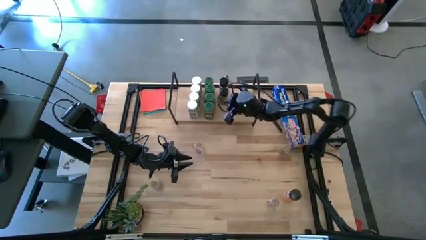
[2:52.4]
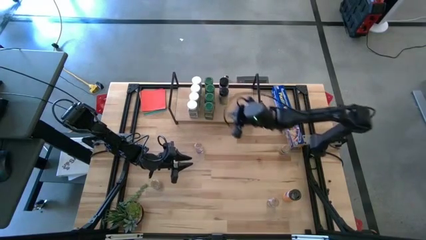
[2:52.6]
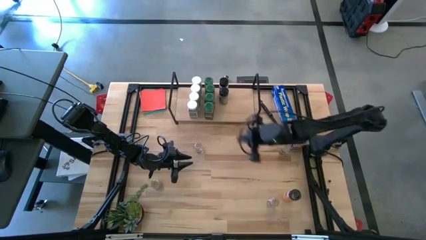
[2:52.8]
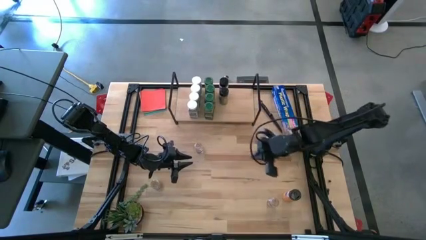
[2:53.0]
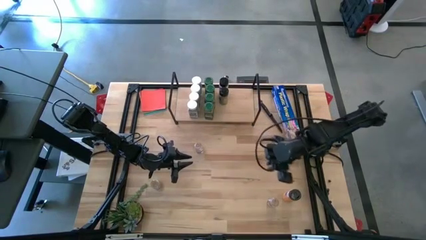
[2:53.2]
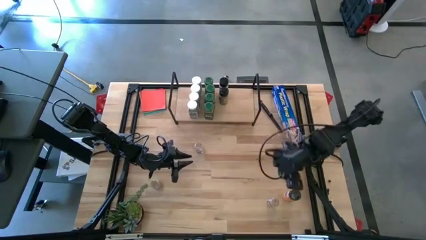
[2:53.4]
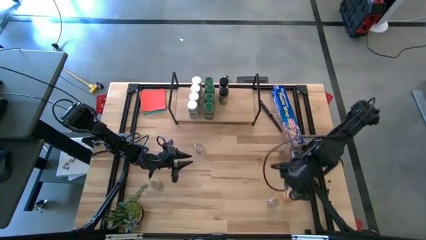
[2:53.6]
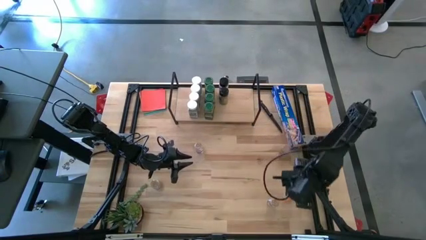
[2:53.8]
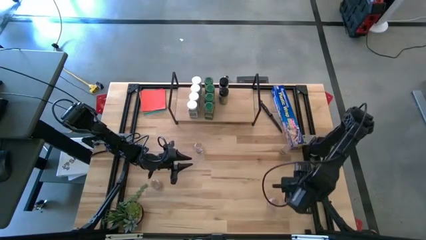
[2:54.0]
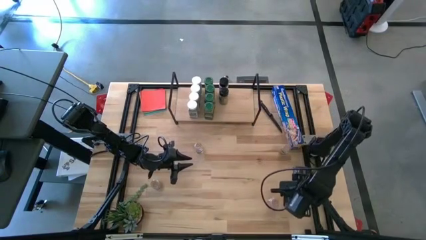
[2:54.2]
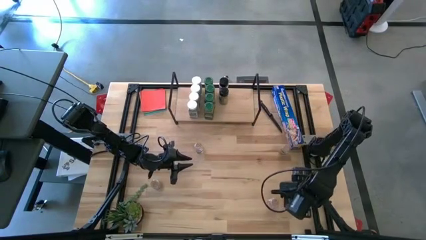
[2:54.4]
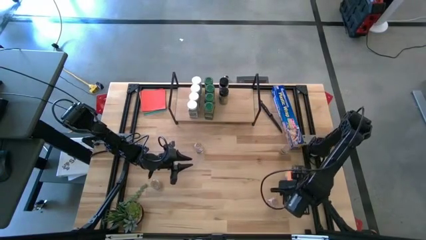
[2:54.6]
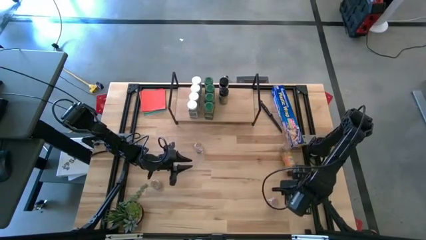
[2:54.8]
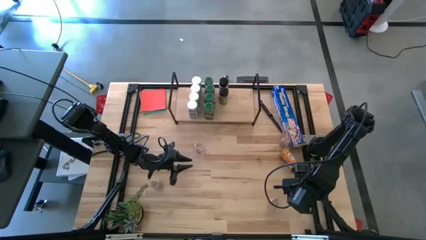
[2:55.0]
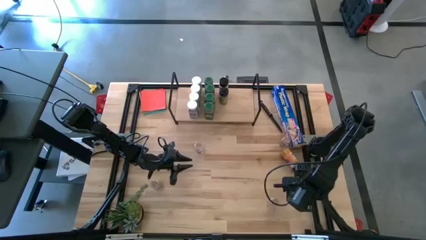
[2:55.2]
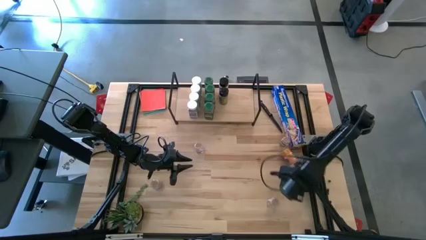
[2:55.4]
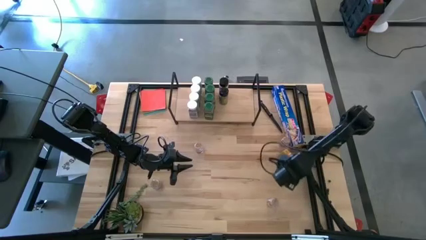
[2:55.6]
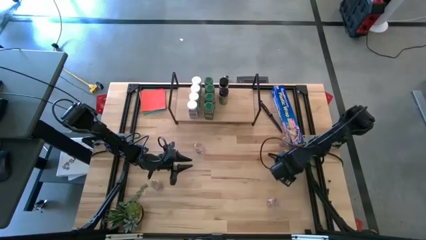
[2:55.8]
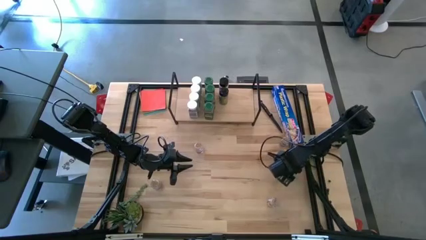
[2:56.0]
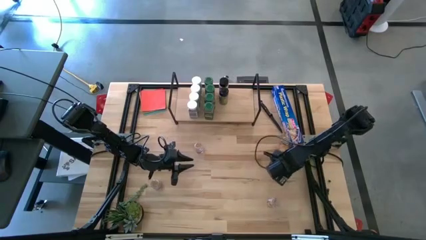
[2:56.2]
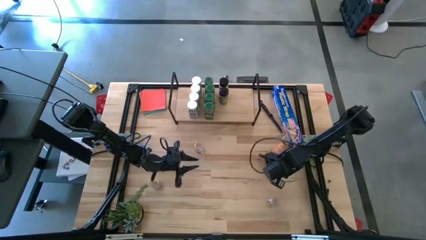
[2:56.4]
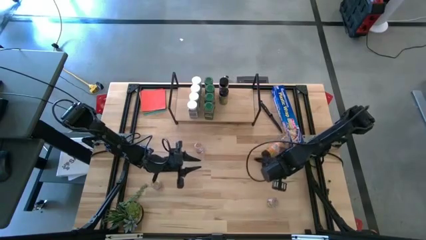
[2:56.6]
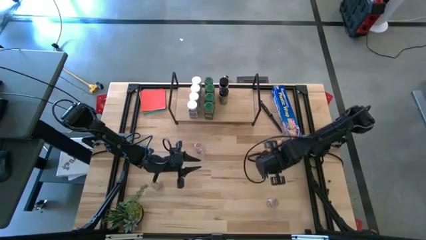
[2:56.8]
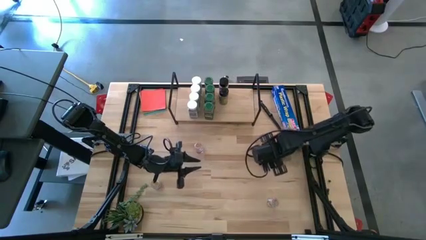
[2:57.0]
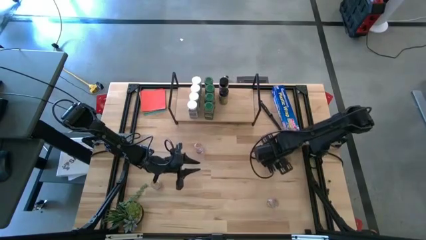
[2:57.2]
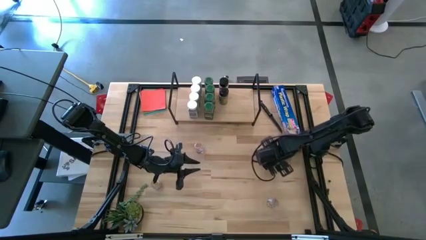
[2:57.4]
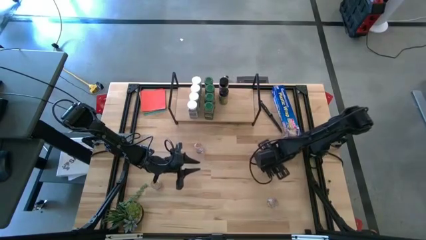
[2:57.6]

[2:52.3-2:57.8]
Task: Shelf spices
Put the black seasoning bottle on the shelf

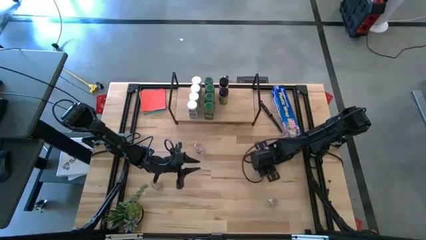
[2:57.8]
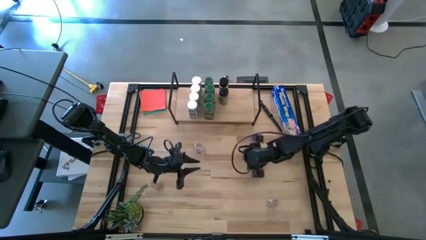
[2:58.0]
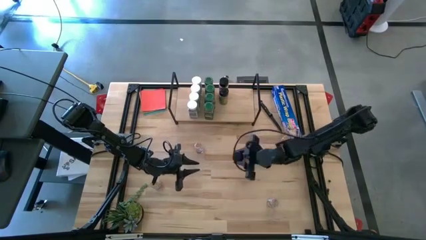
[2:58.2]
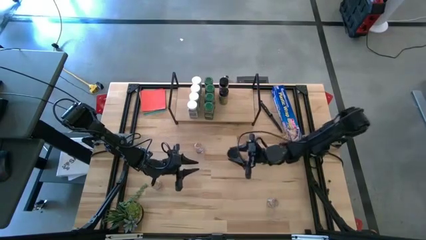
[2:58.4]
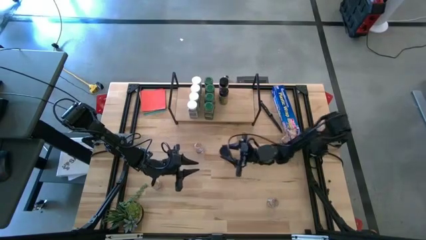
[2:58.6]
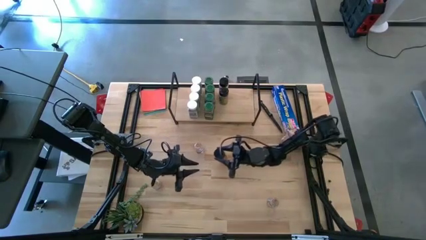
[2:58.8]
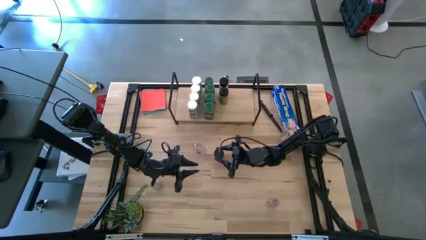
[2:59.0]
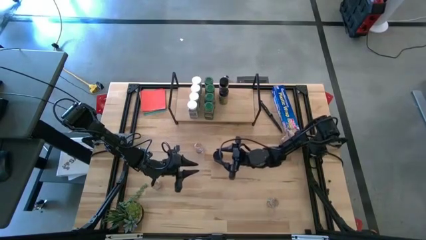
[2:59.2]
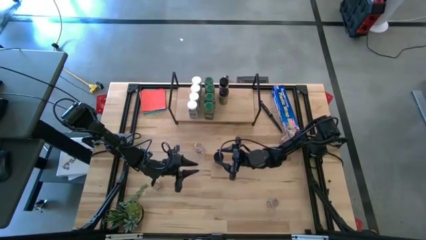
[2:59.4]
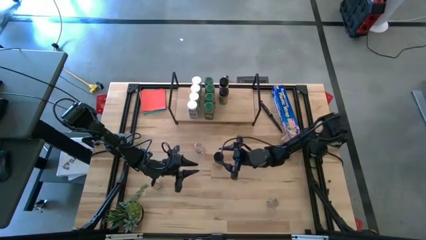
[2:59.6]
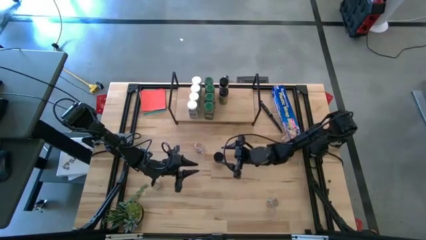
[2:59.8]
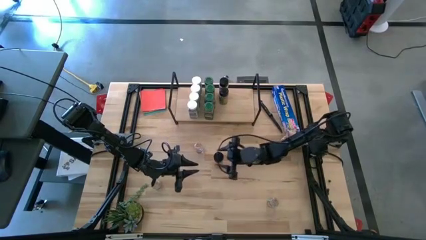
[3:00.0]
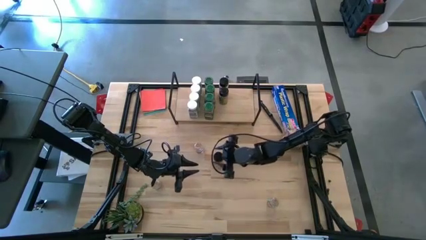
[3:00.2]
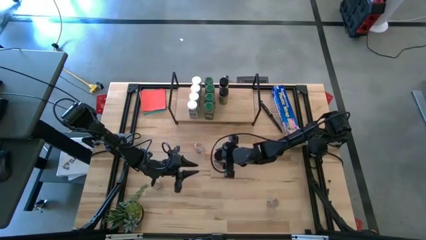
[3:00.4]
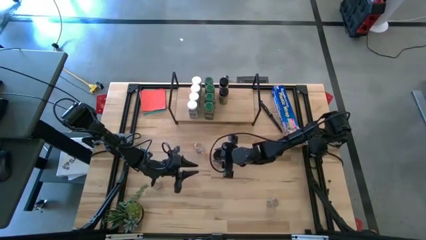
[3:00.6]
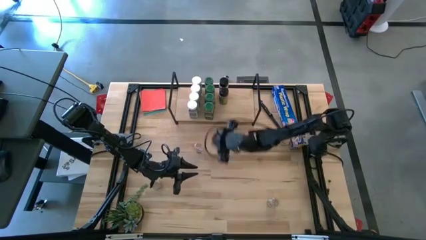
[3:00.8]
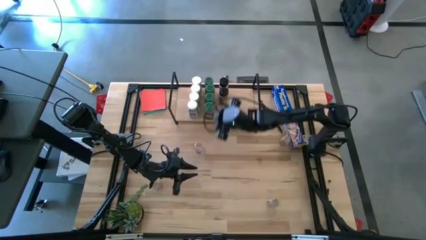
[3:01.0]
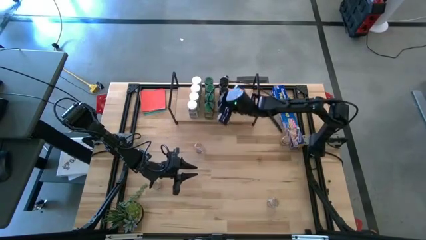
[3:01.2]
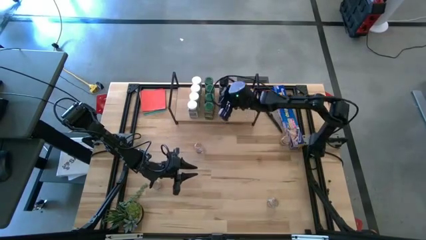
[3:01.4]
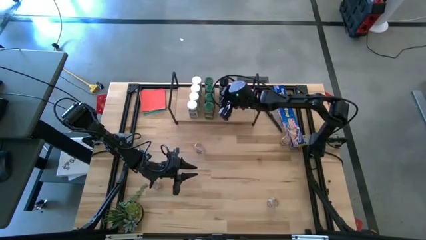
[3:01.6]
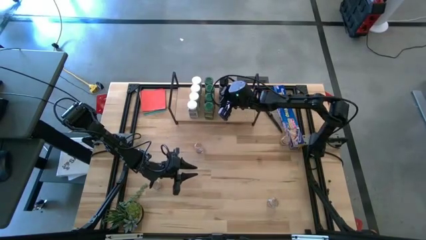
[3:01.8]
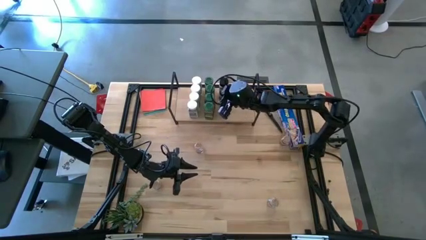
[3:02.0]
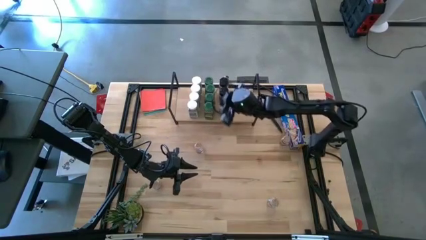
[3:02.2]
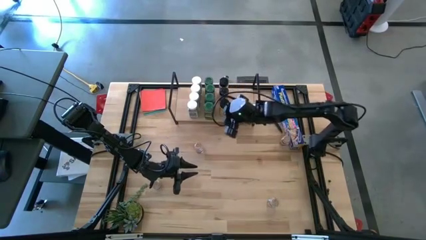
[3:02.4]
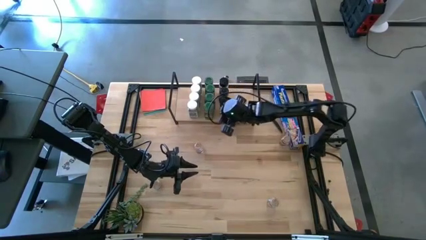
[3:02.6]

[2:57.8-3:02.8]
Put the black seasoning bottle on the shelf

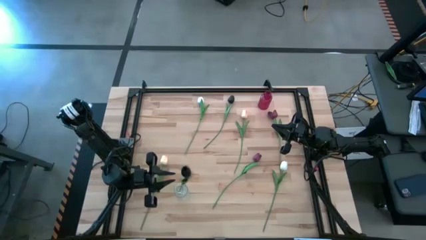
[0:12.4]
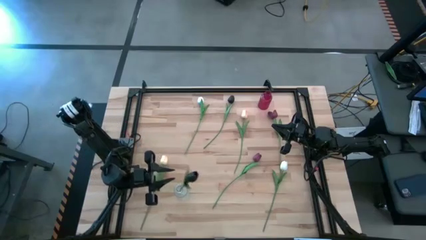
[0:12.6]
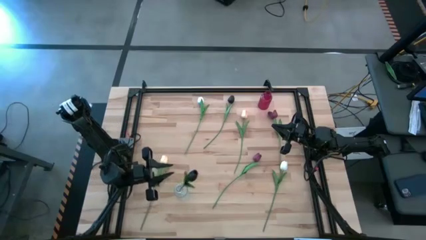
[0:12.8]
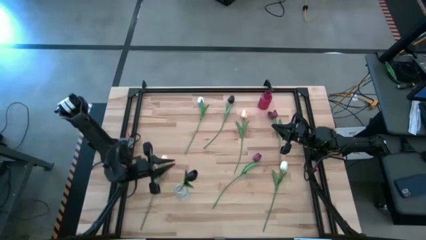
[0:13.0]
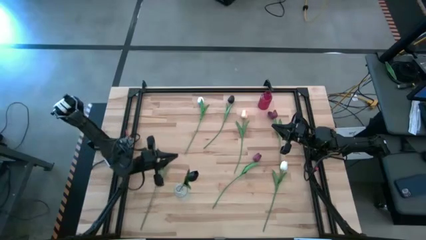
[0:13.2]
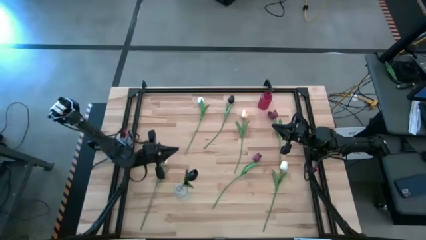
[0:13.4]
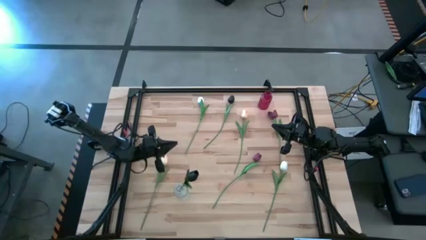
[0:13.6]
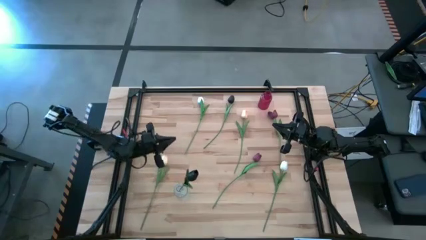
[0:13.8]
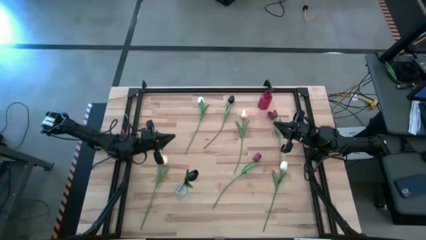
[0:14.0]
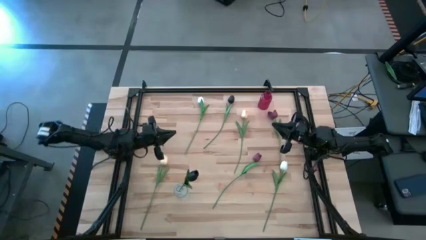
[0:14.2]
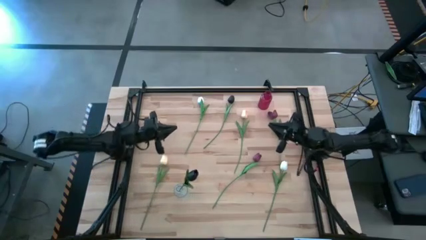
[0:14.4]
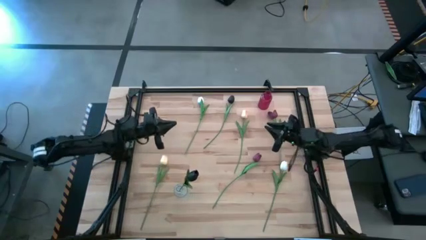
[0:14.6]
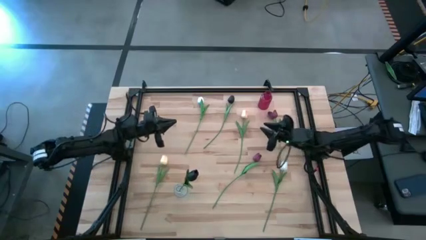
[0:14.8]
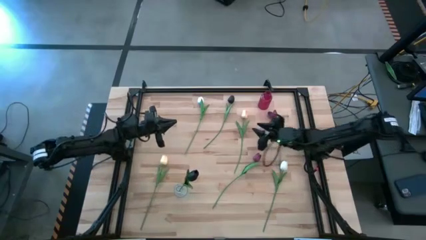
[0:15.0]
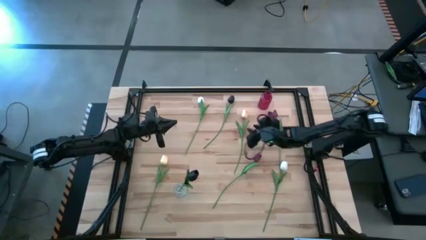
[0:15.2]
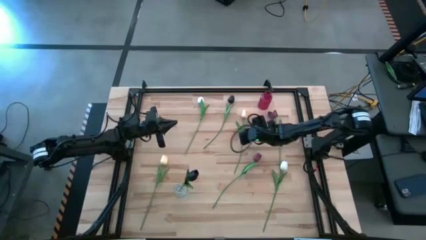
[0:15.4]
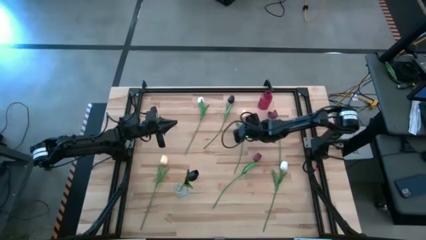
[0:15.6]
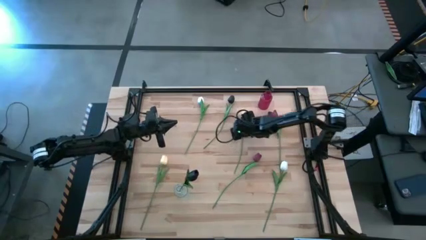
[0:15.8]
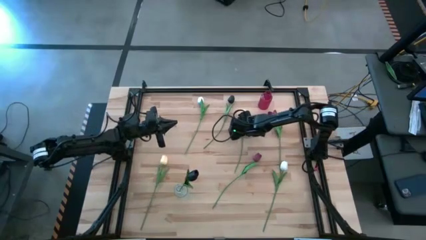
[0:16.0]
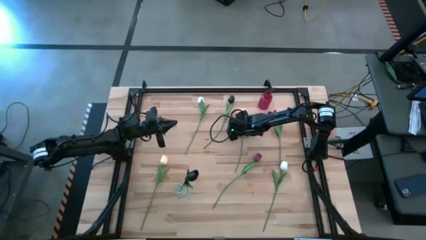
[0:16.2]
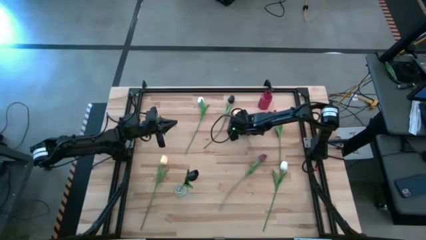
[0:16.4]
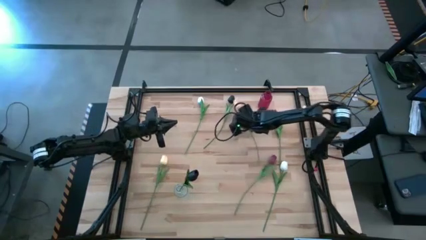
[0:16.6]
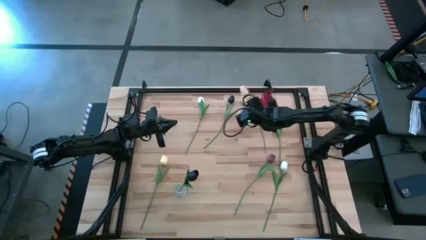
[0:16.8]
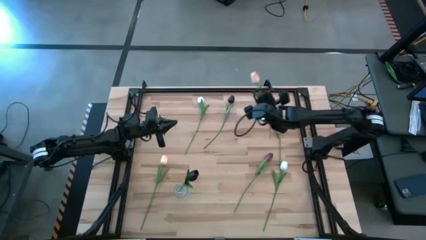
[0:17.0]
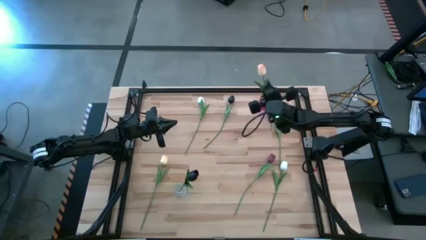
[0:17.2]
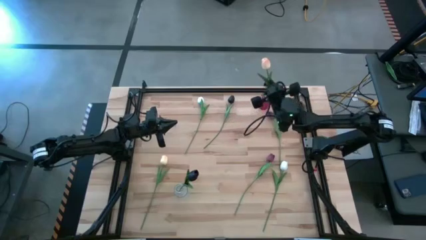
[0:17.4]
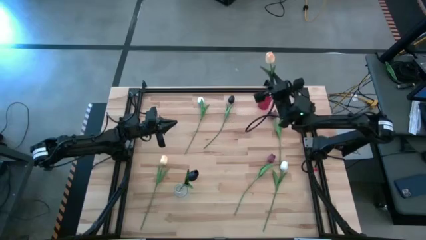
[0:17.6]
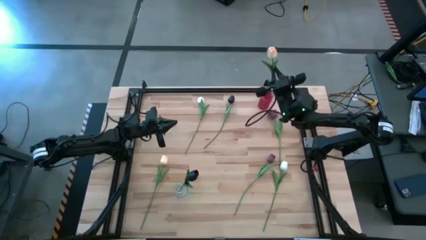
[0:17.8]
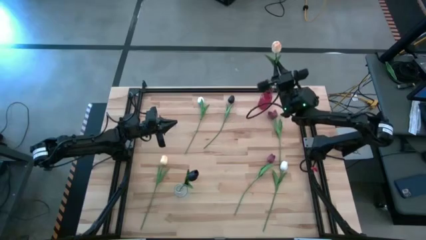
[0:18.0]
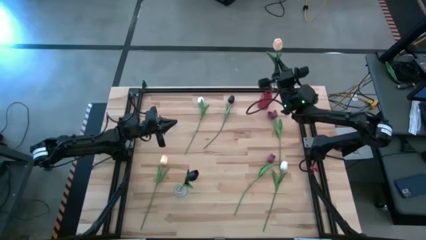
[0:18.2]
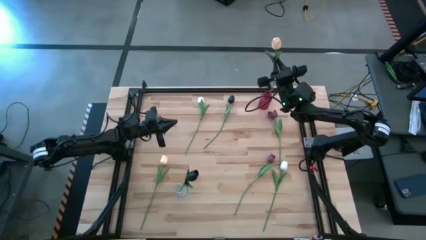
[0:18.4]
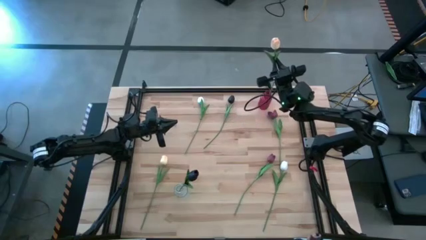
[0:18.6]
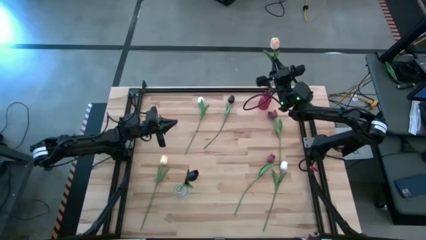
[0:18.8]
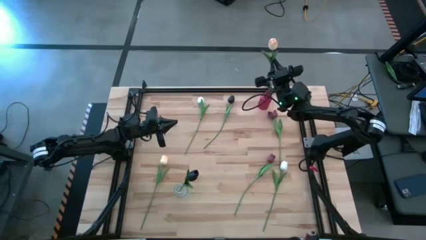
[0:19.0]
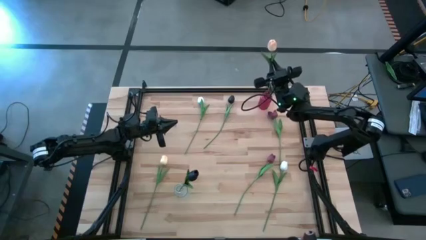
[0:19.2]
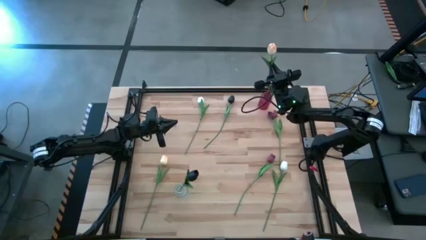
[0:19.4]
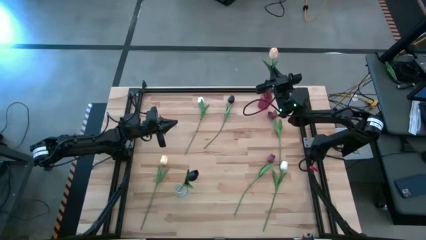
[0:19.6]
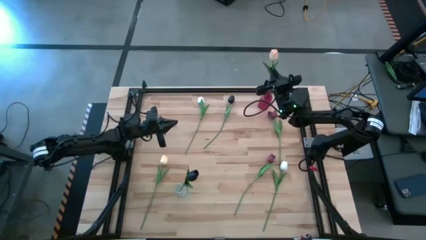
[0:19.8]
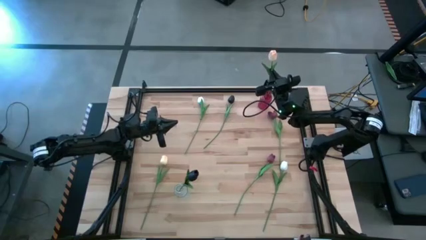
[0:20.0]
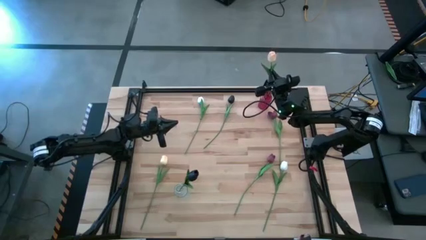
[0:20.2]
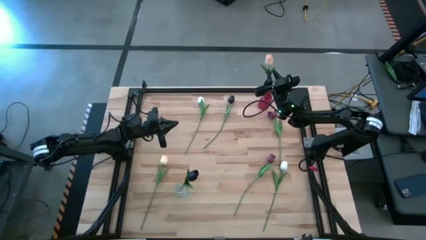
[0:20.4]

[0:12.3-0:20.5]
Task: Sort flowers into vase by color
Put the top light yellow flower into the red vase
